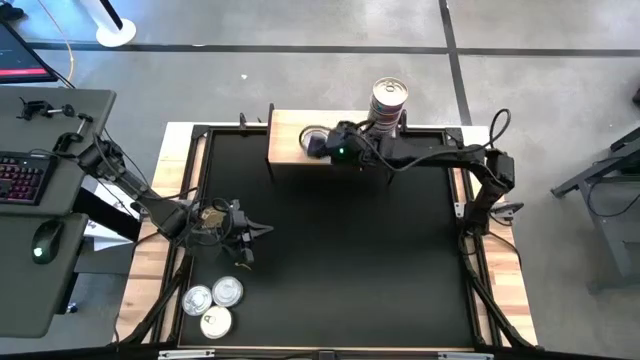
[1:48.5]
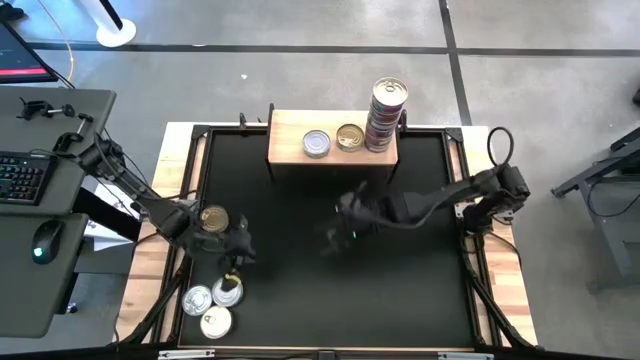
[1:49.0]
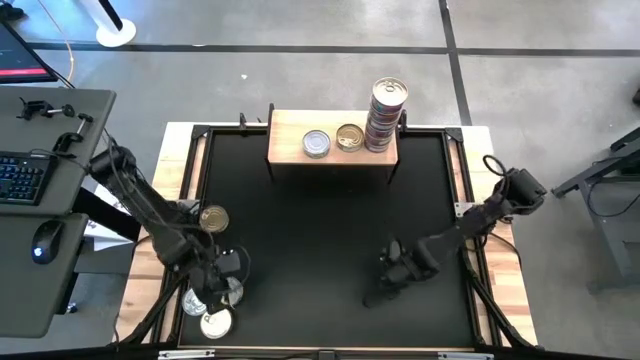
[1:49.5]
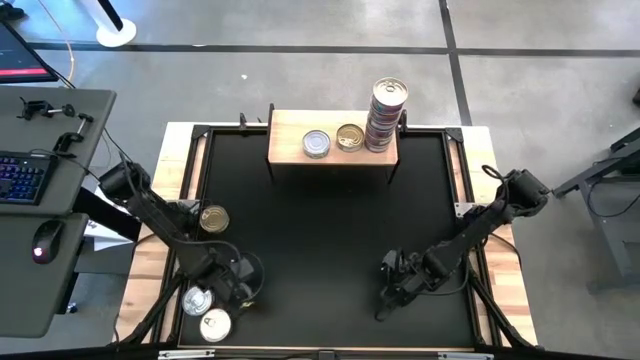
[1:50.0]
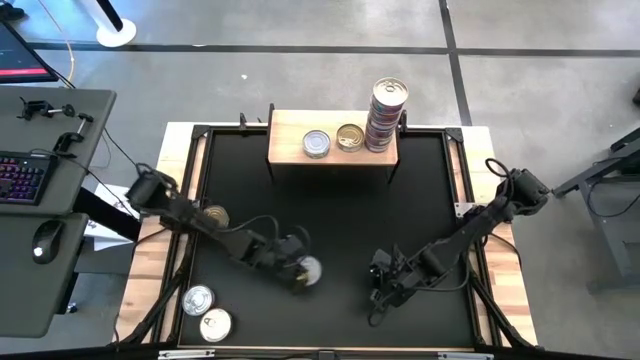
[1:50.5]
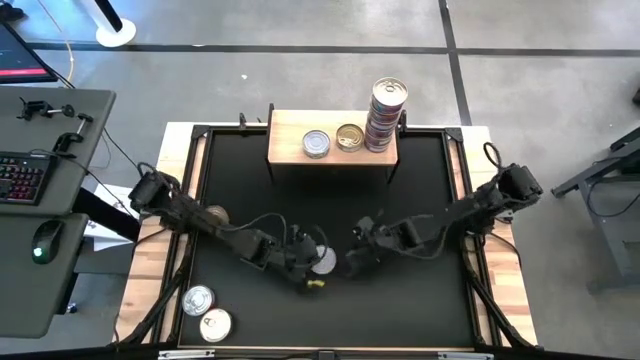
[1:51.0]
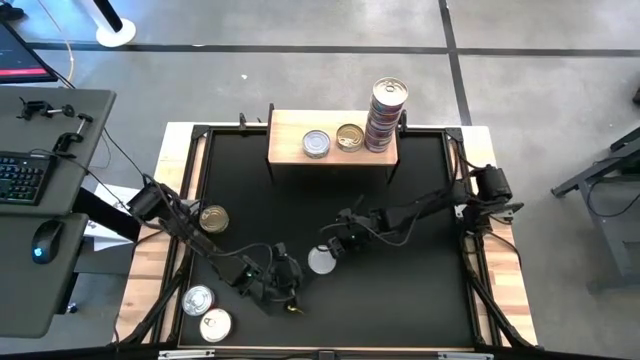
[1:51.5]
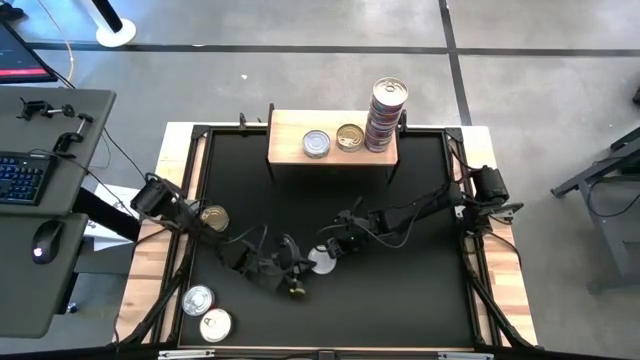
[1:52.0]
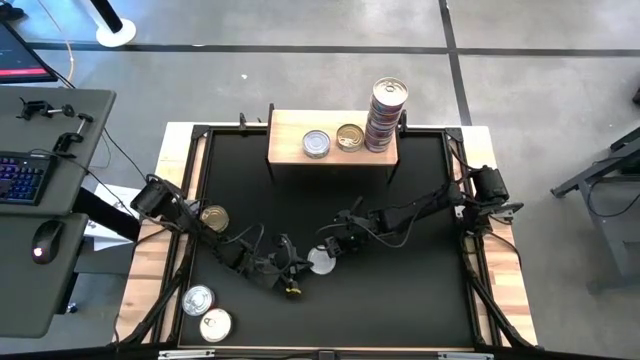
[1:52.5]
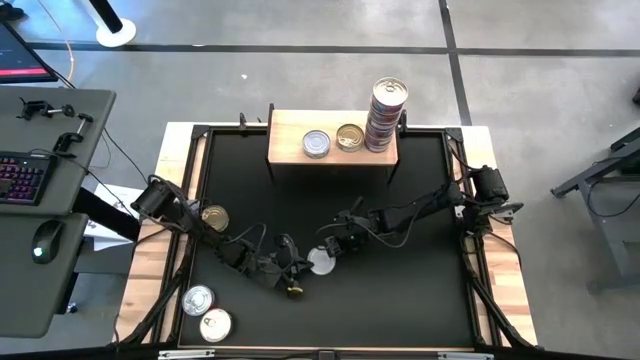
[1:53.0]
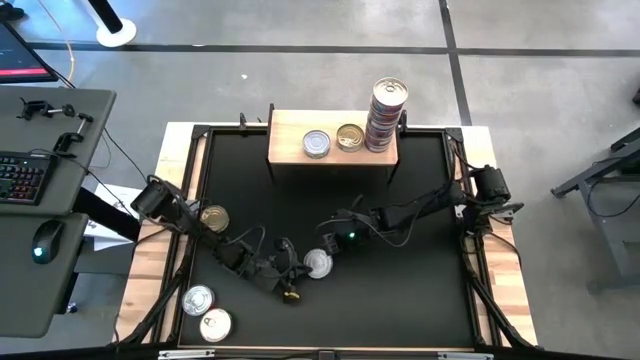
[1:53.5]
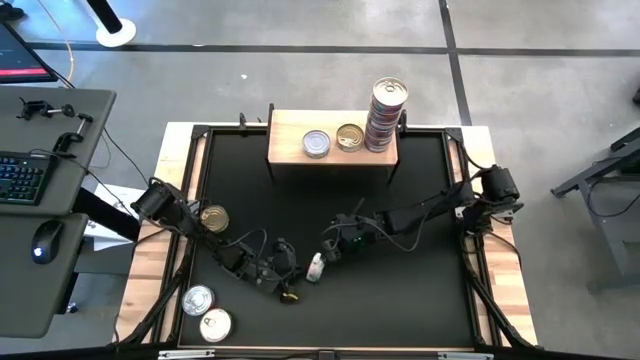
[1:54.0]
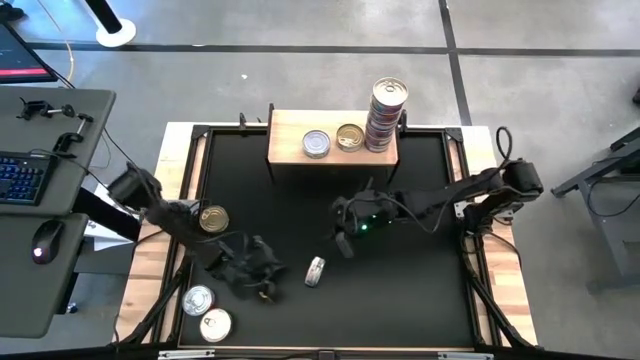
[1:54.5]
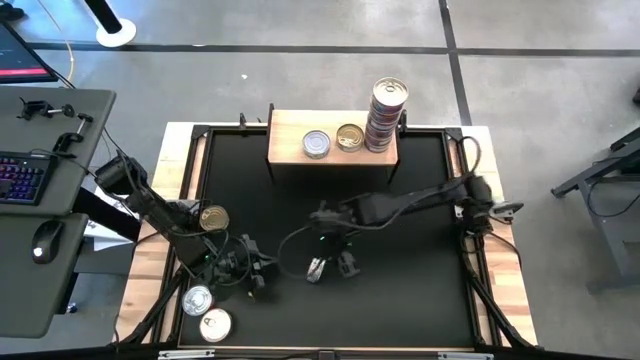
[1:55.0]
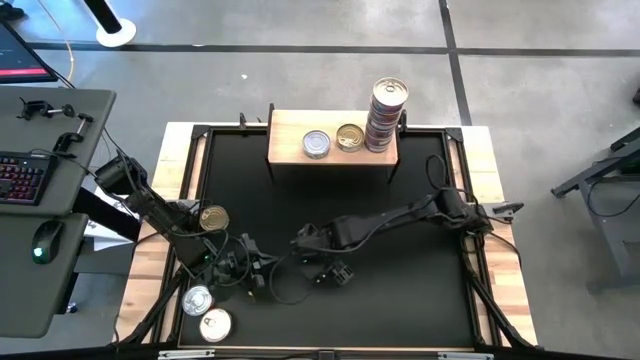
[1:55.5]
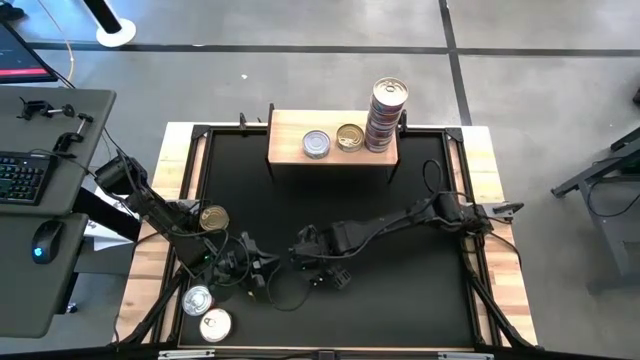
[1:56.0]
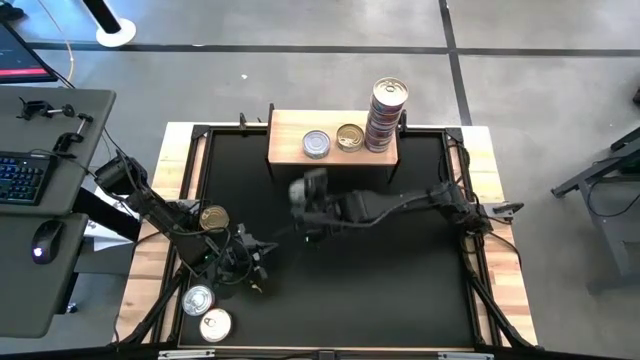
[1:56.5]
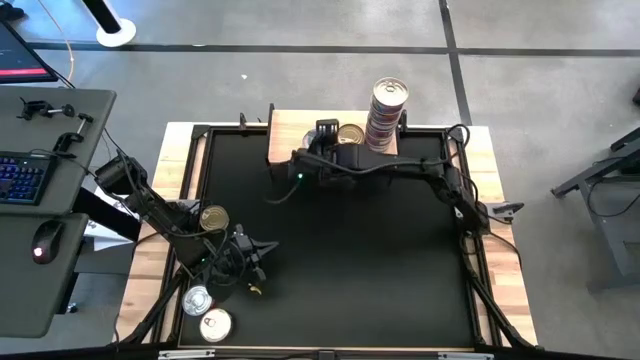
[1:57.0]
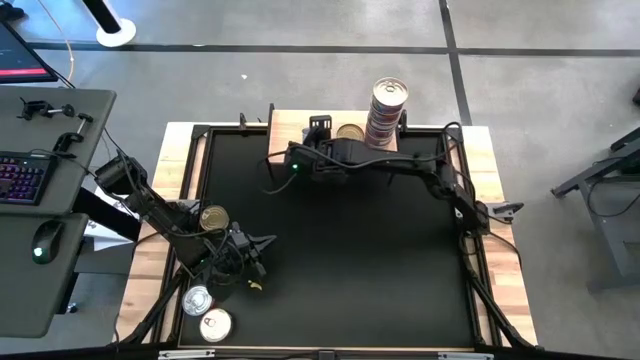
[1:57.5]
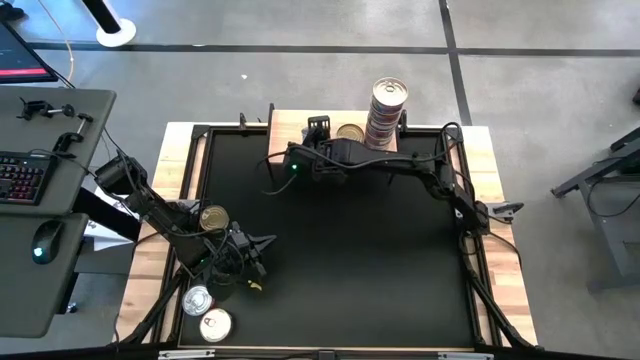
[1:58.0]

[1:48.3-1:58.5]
Task: Stack canned seafood by type on shelf
Stack the white and green tuna can on top of the white and green tuna can

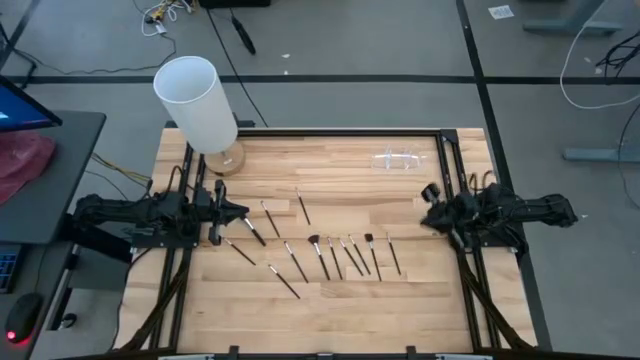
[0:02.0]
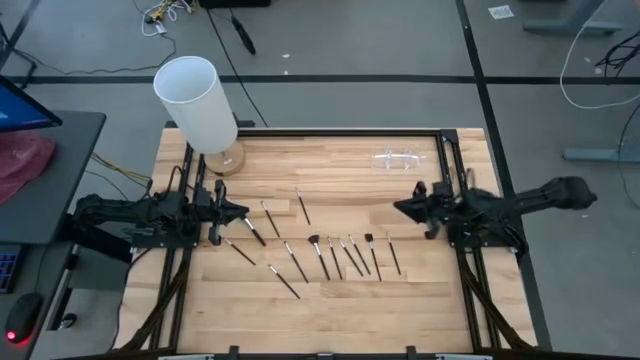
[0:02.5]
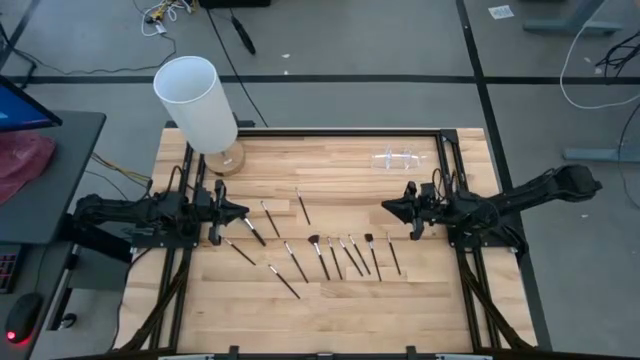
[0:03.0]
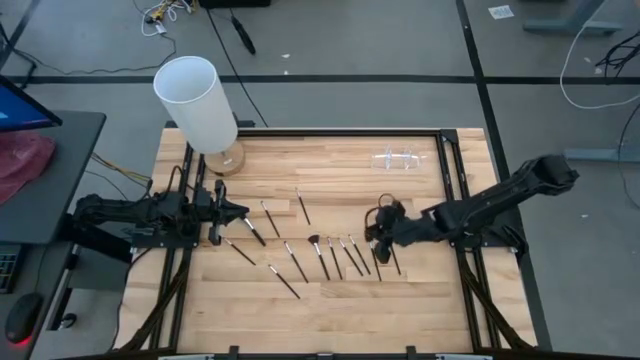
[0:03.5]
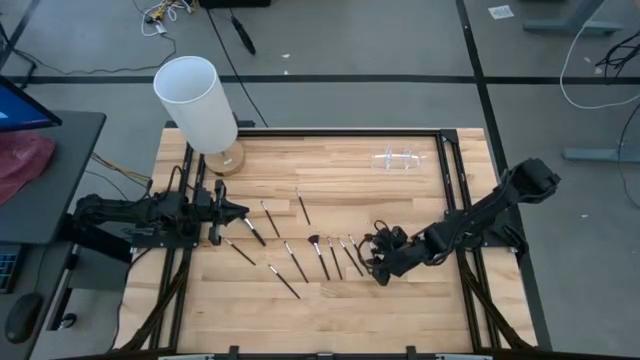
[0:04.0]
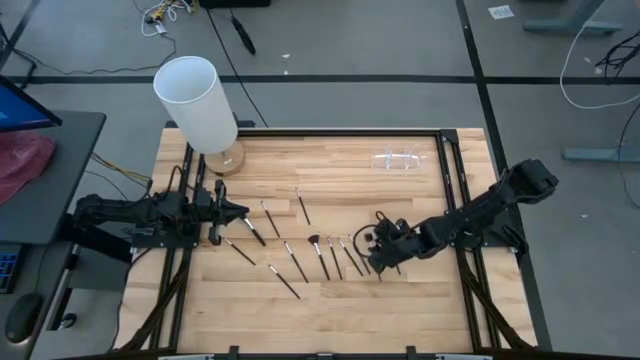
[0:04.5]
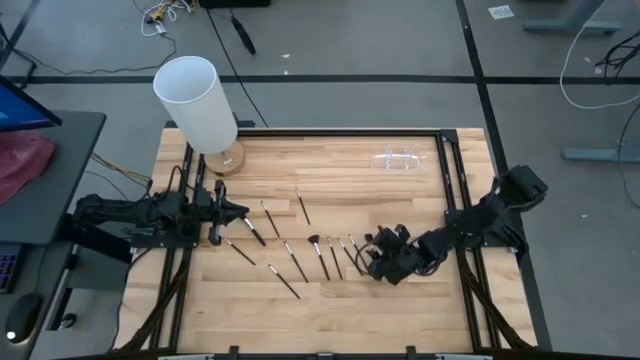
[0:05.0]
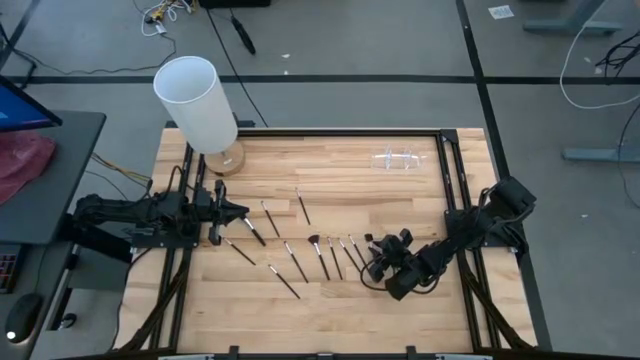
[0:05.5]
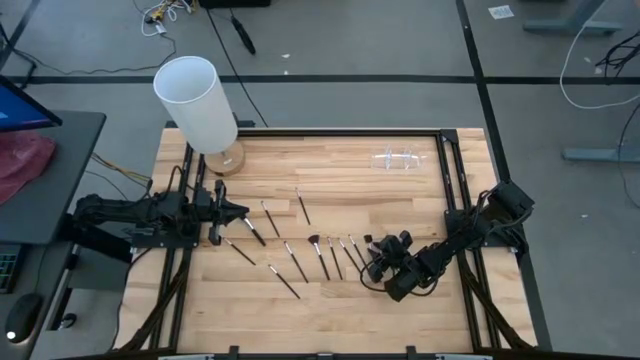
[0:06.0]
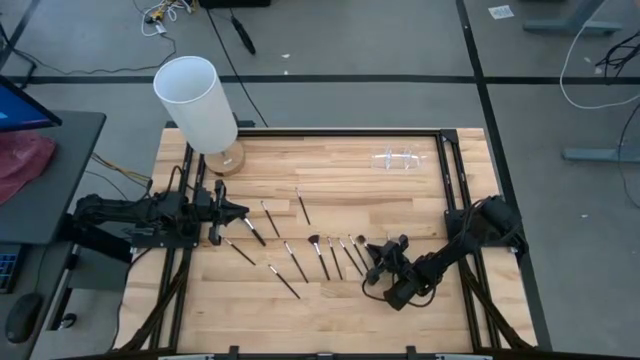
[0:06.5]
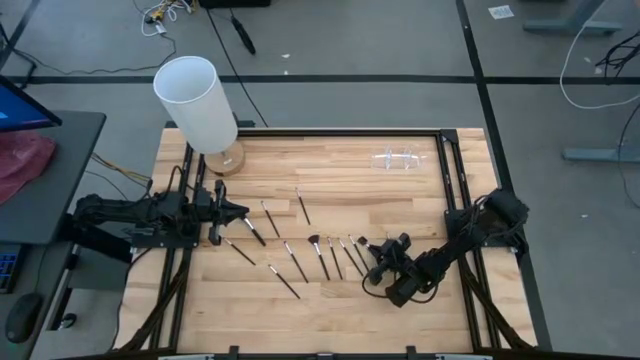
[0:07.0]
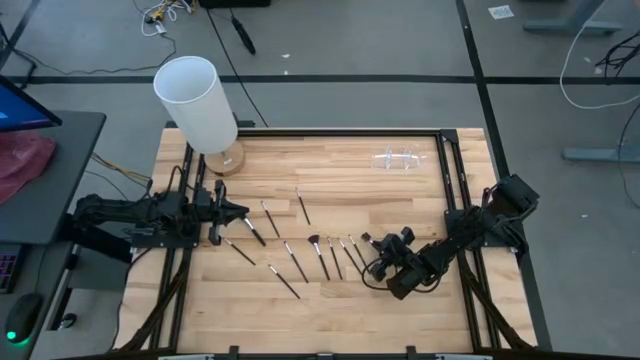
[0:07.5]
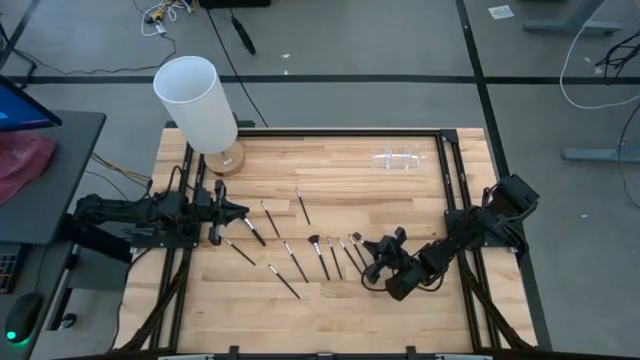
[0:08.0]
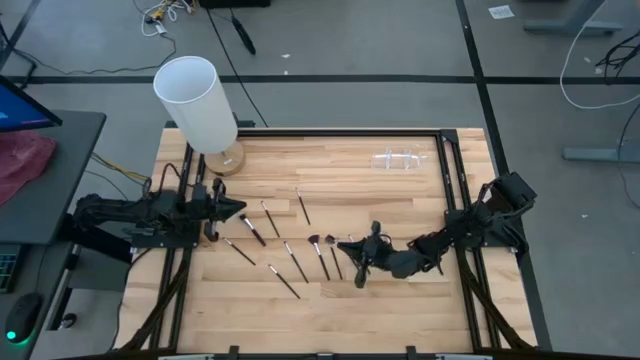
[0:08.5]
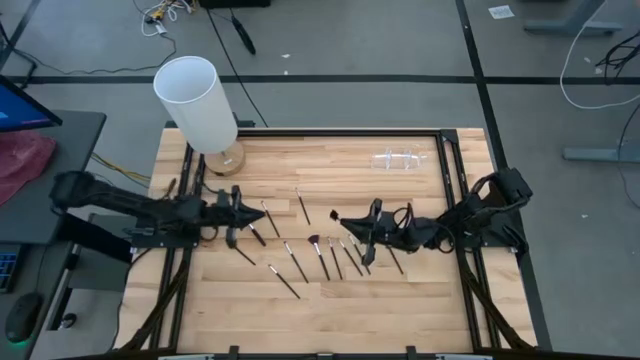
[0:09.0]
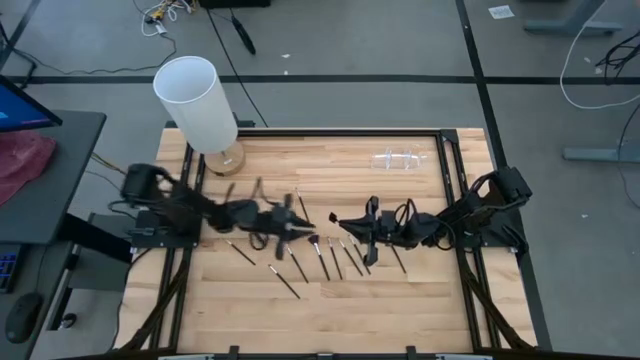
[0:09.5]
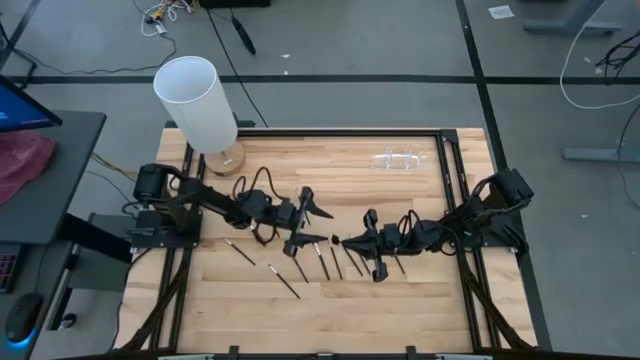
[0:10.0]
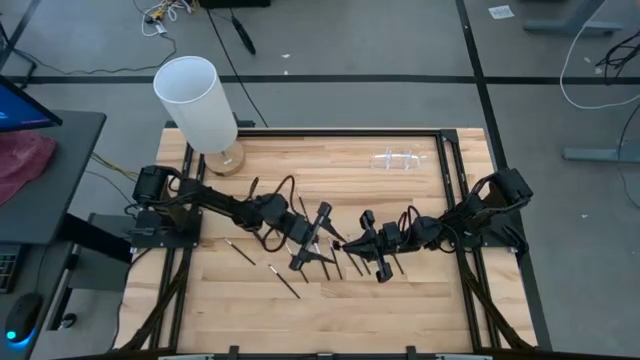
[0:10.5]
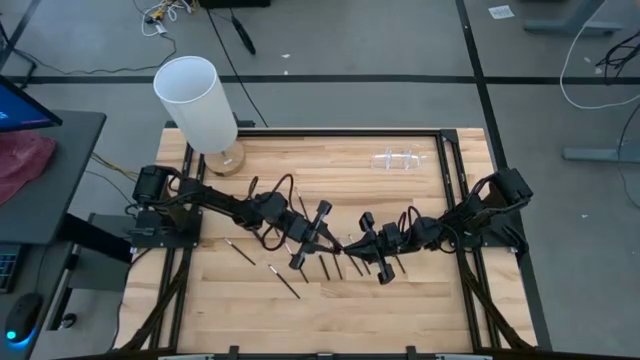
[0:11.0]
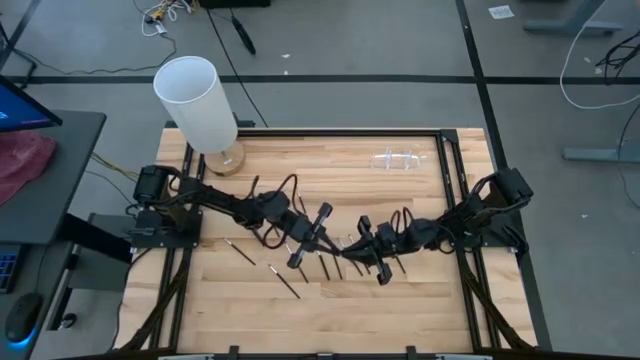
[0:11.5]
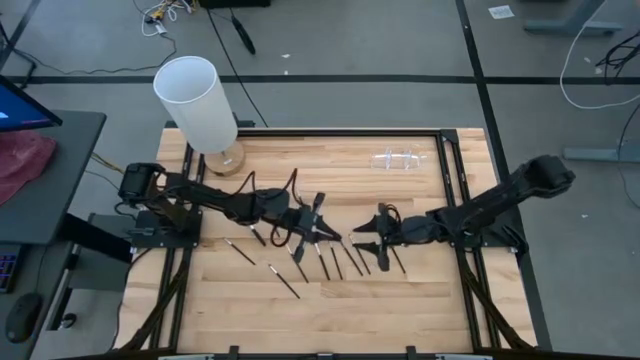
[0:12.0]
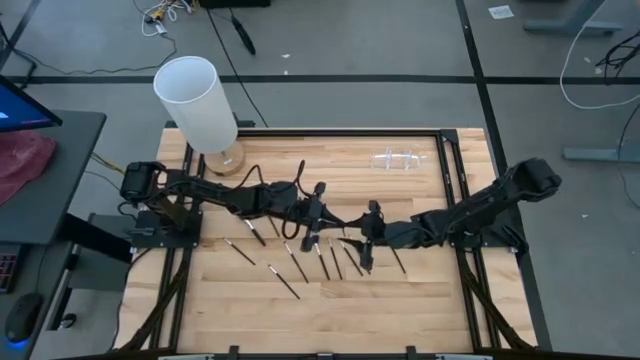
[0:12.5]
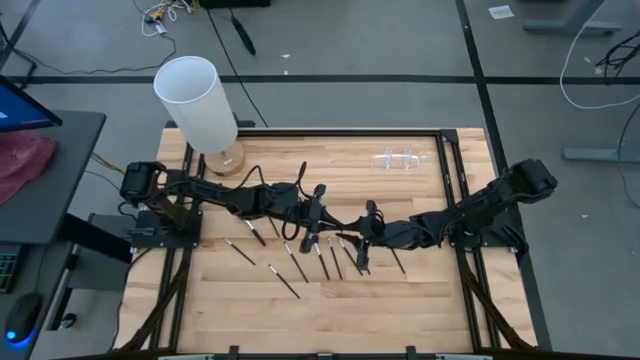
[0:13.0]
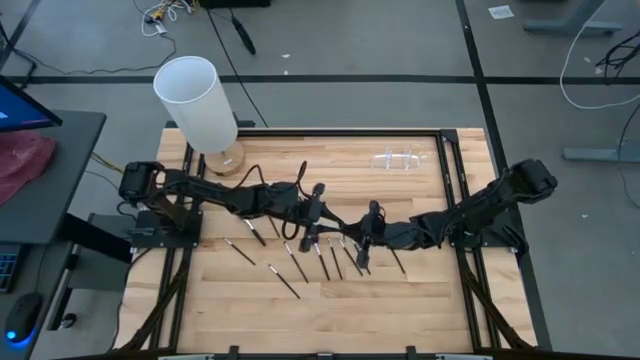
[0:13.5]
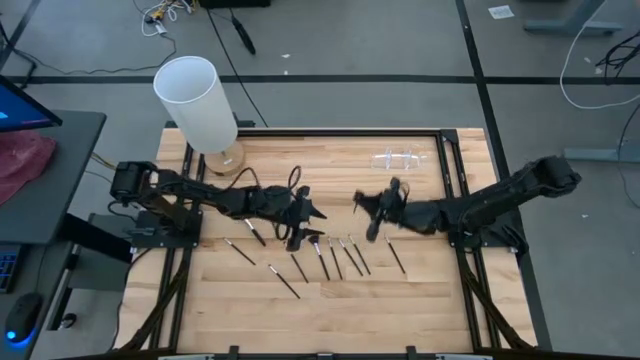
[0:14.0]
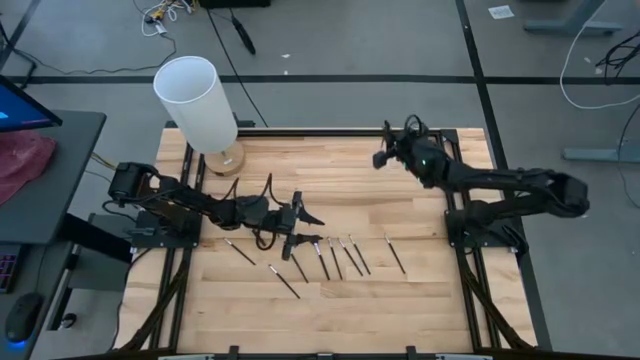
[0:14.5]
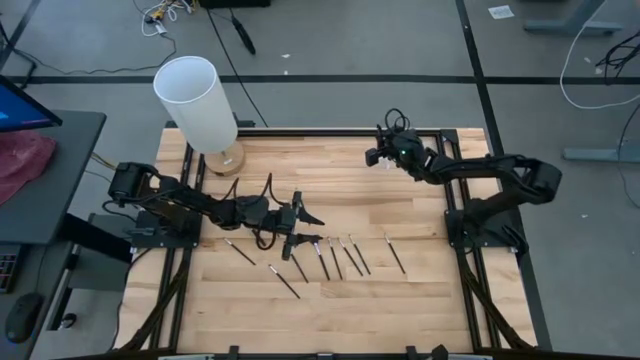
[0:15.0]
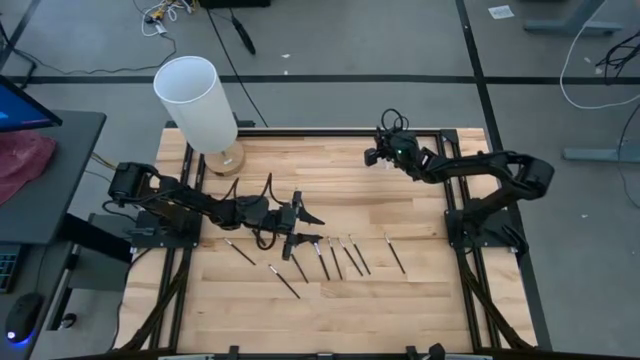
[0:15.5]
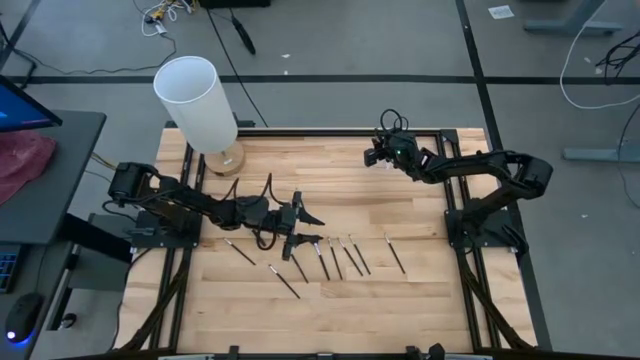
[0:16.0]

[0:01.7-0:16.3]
Task: Put items in baskets/containers
Put the brow brush into the transparent organizer
